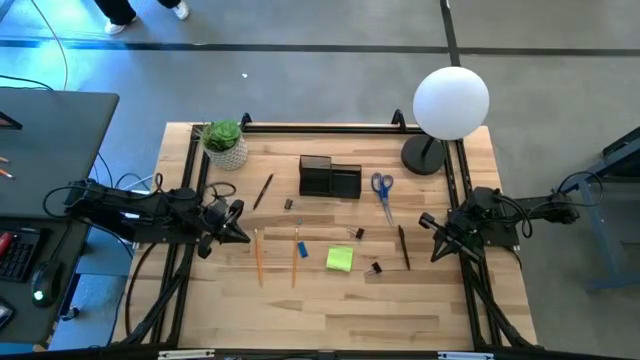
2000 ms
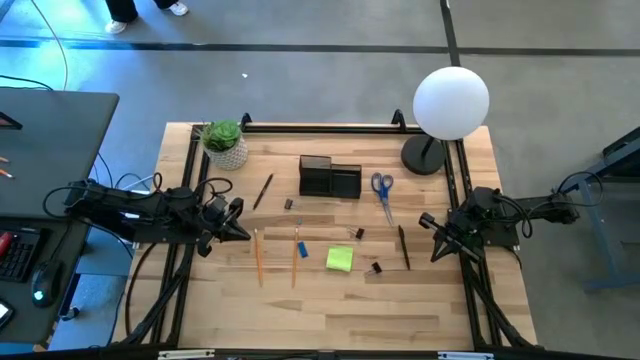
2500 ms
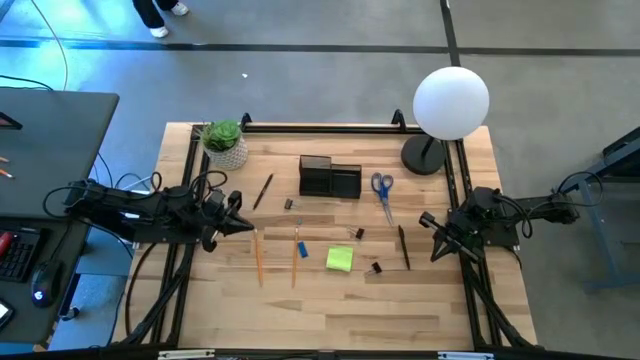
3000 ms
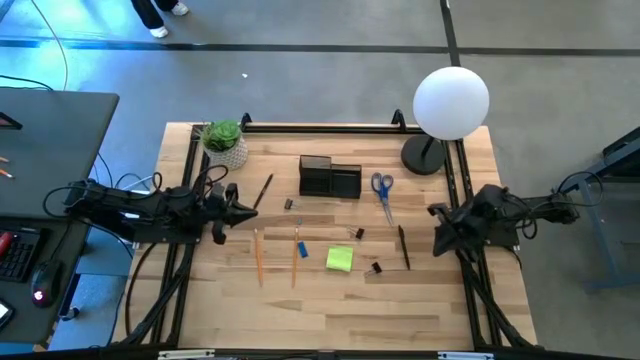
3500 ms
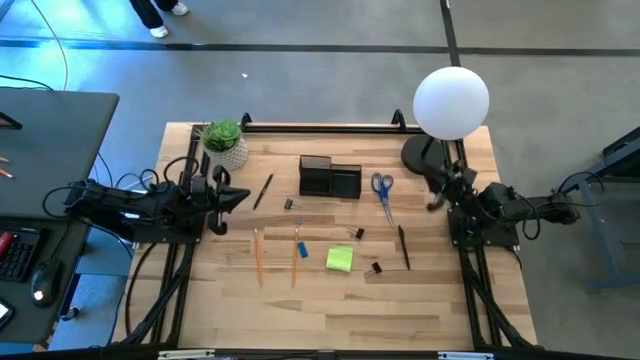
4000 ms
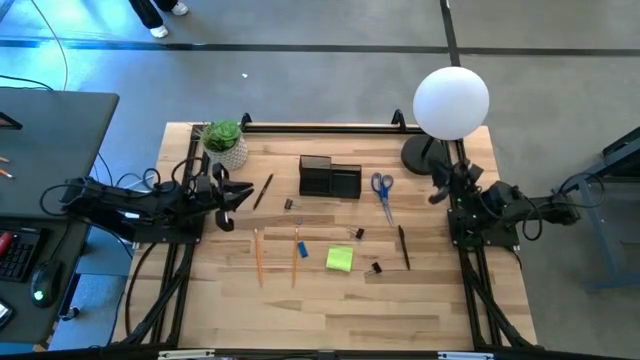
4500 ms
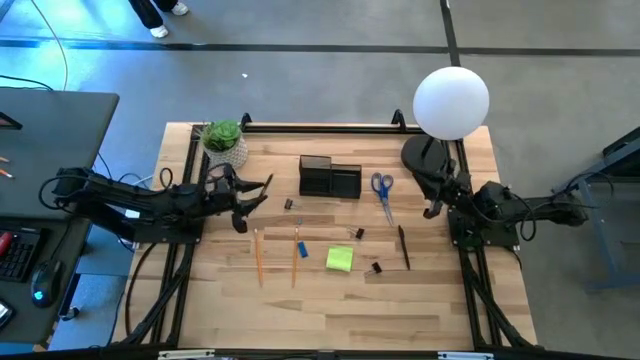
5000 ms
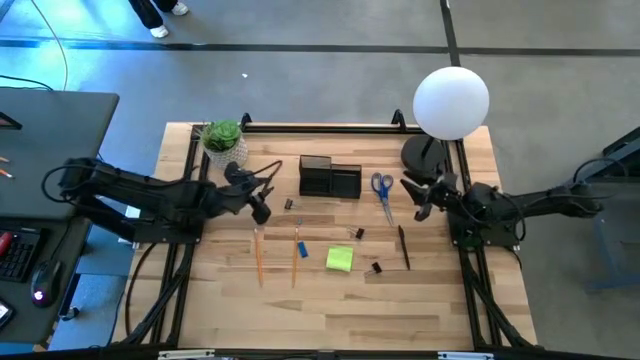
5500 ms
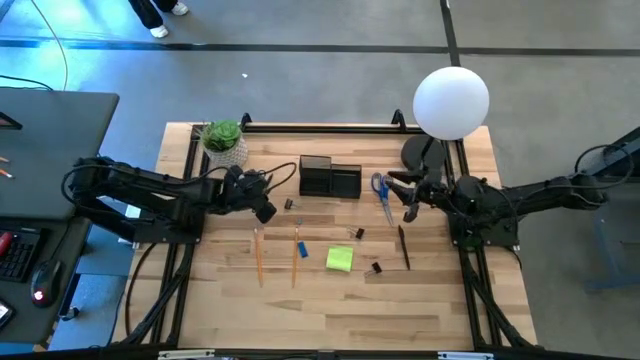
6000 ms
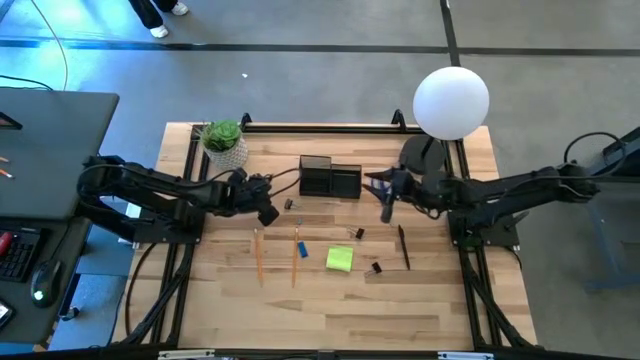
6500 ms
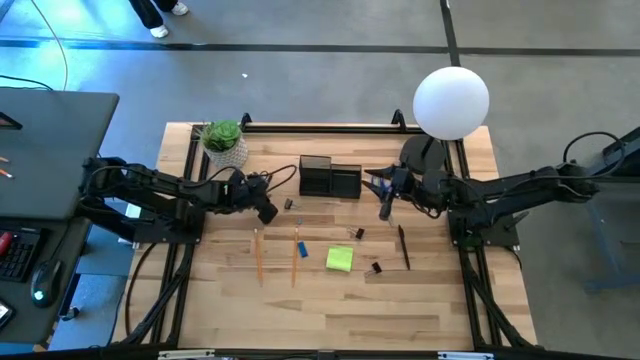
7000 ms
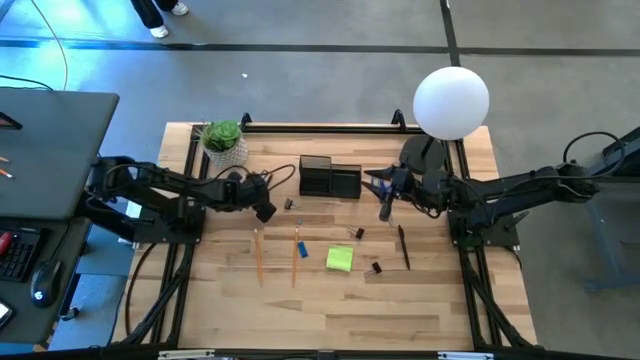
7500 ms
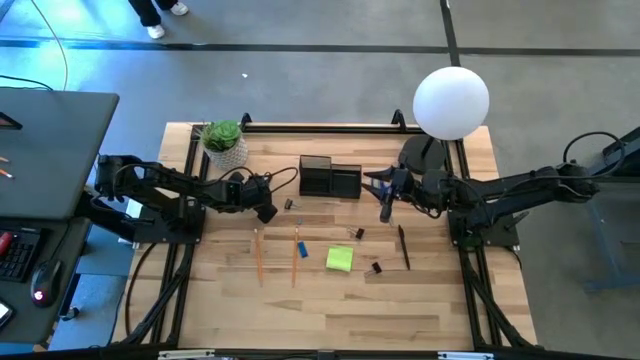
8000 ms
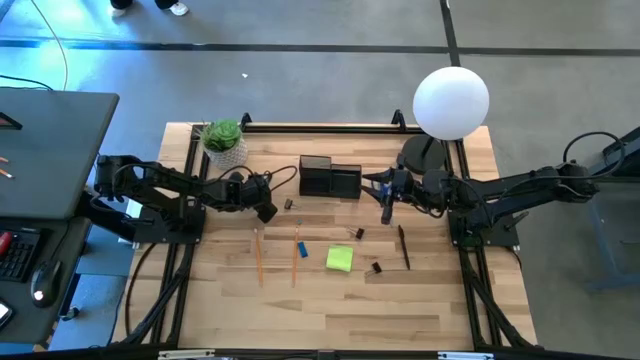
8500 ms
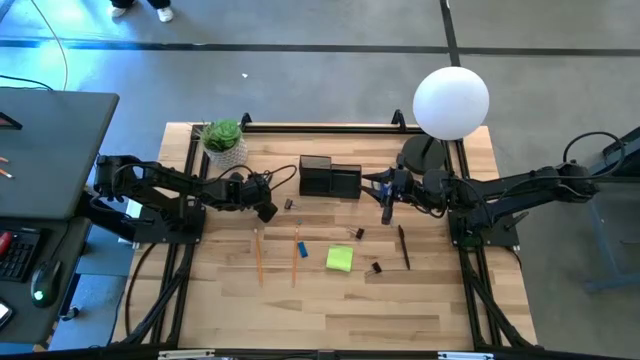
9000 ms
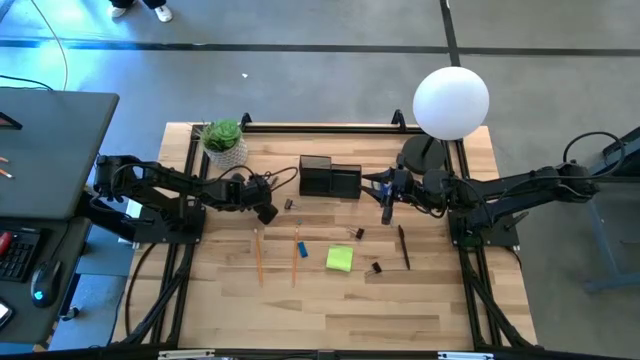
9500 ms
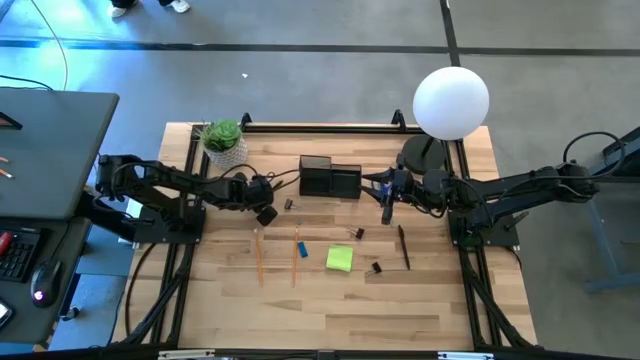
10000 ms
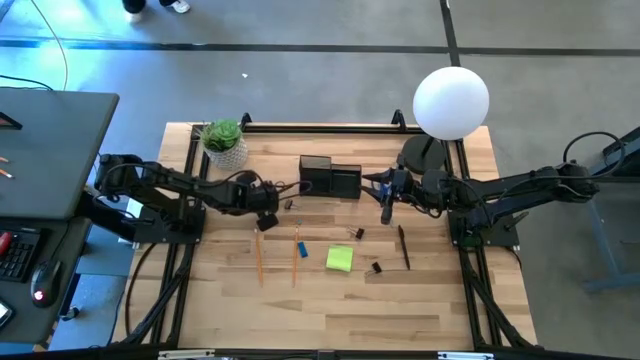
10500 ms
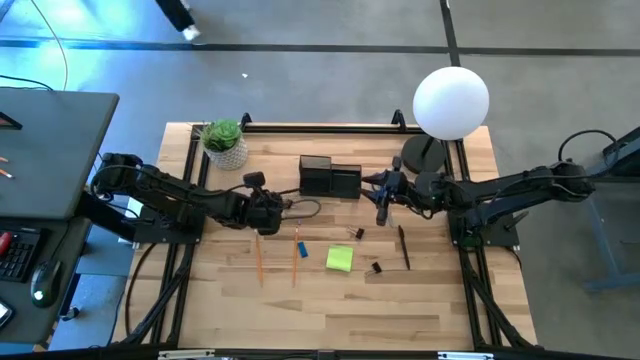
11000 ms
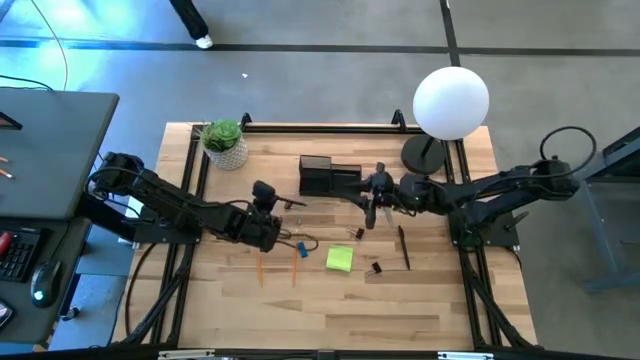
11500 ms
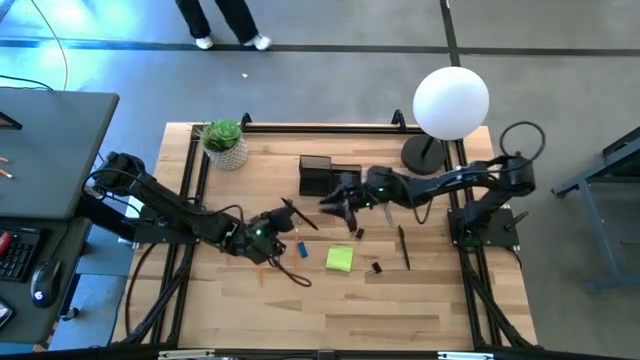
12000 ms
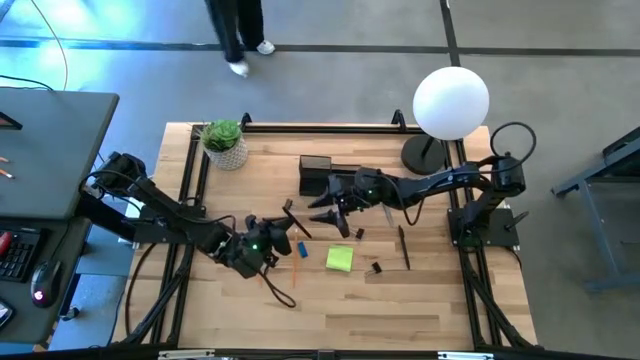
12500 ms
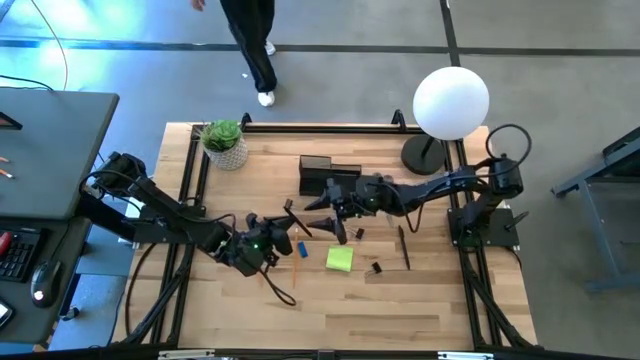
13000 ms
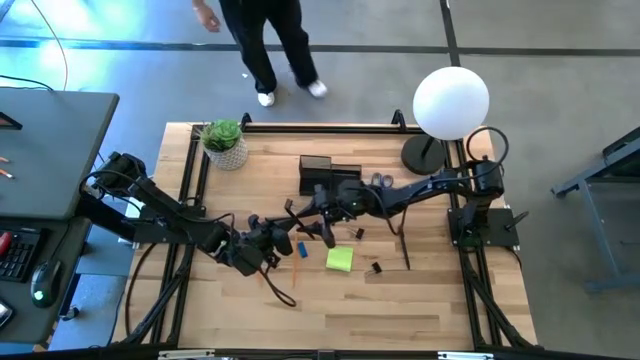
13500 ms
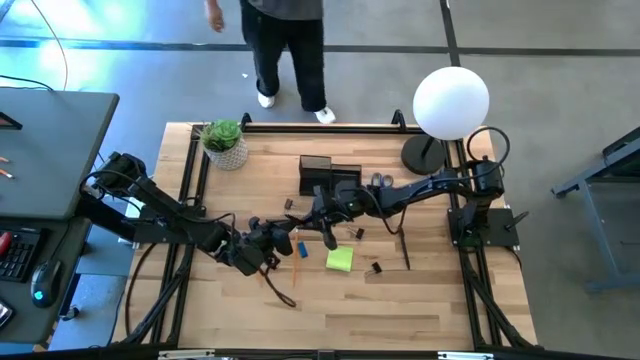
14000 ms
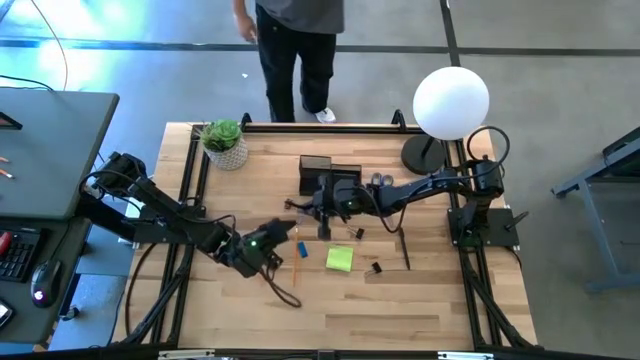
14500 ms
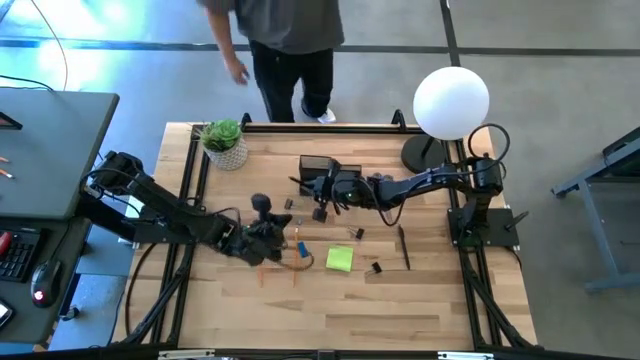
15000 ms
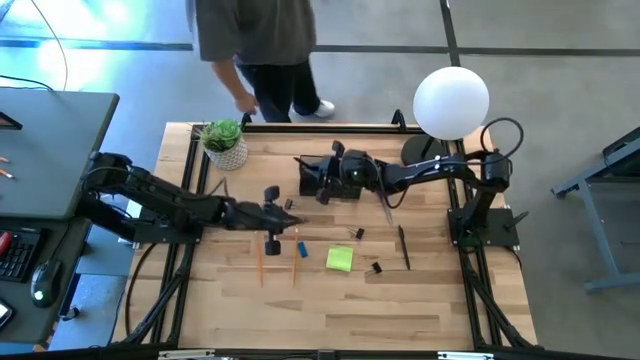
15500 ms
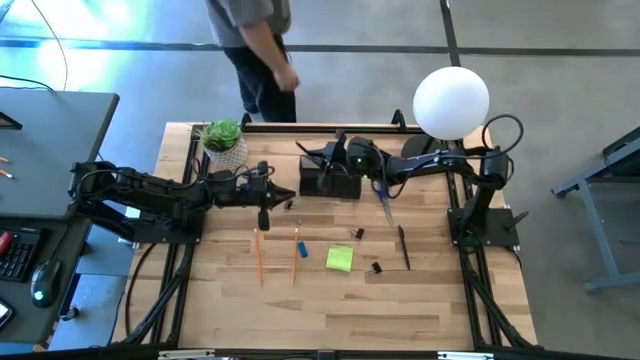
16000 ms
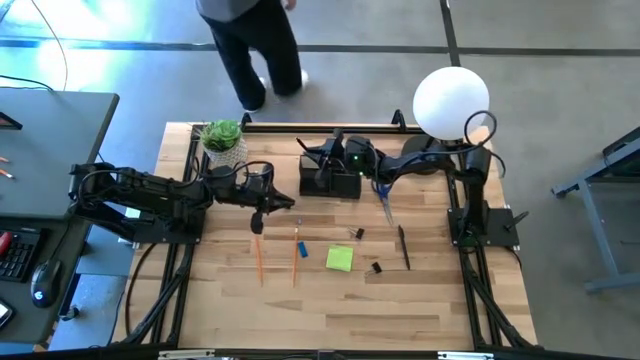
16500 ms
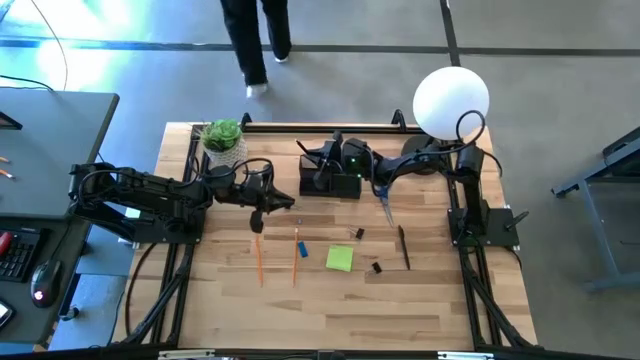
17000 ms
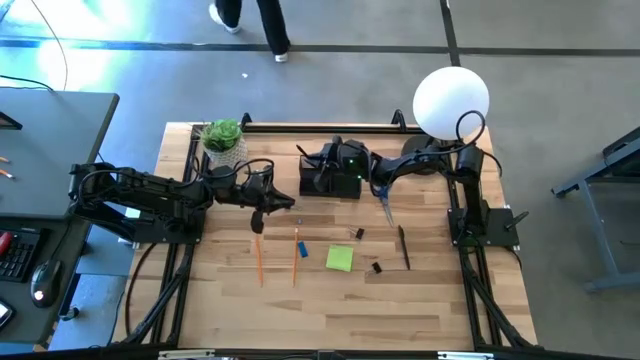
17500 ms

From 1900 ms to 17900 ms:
Task: Pick and place office supplies into organizer
Put the black pen into the black desk organizer

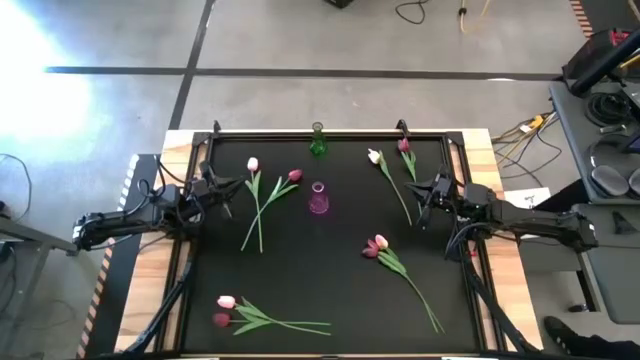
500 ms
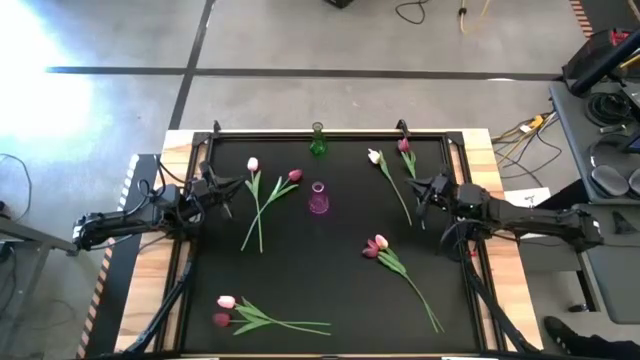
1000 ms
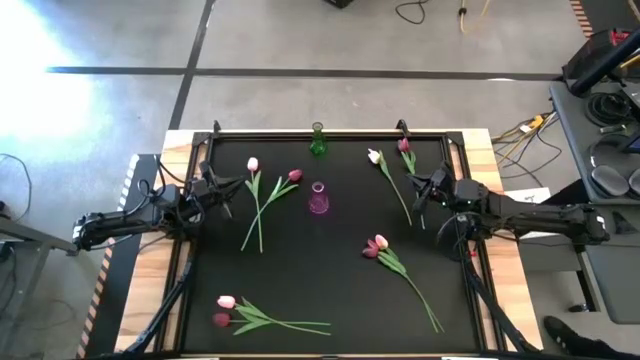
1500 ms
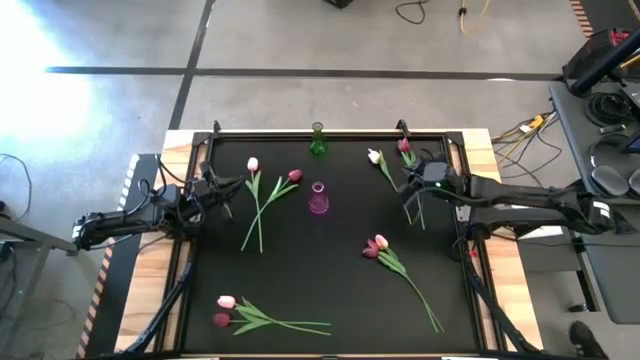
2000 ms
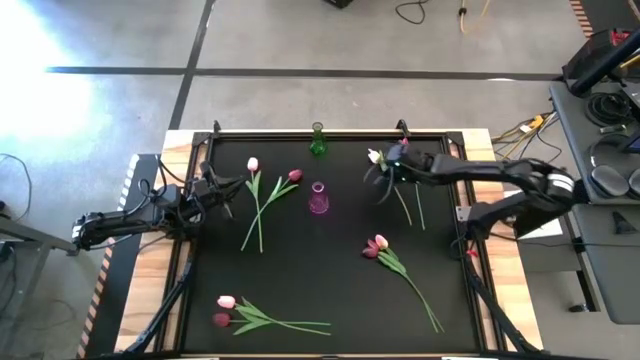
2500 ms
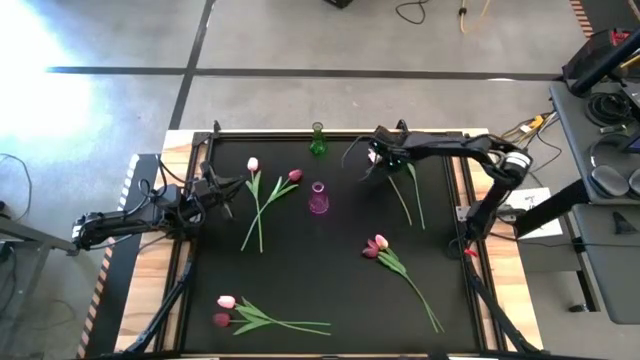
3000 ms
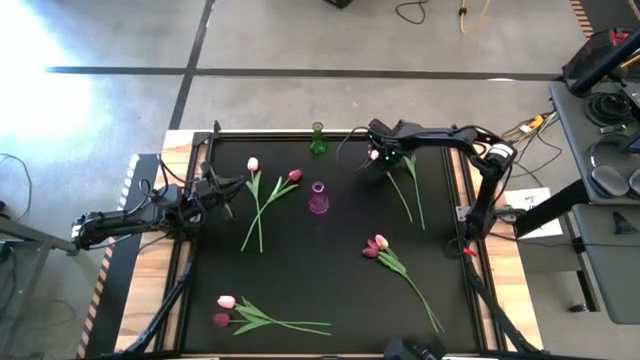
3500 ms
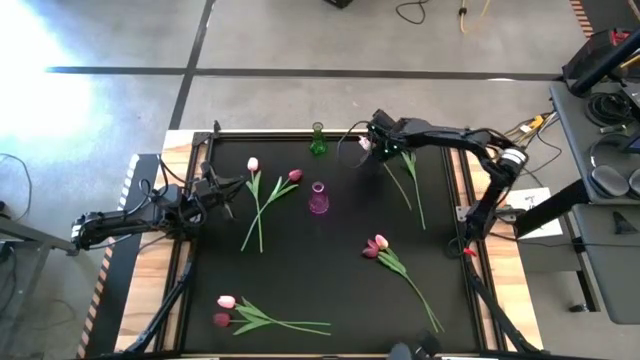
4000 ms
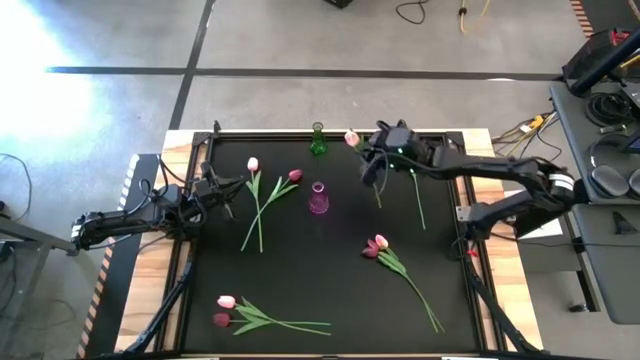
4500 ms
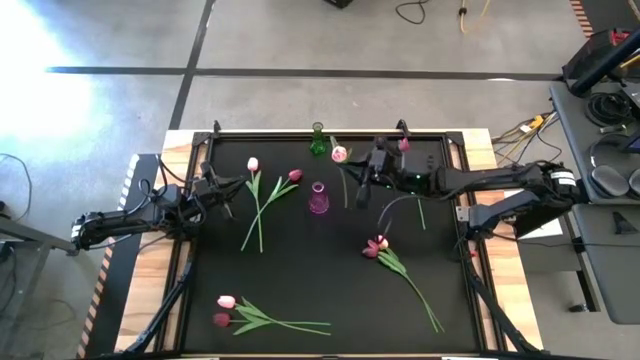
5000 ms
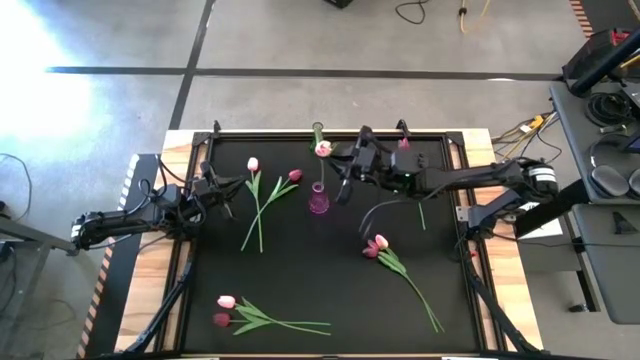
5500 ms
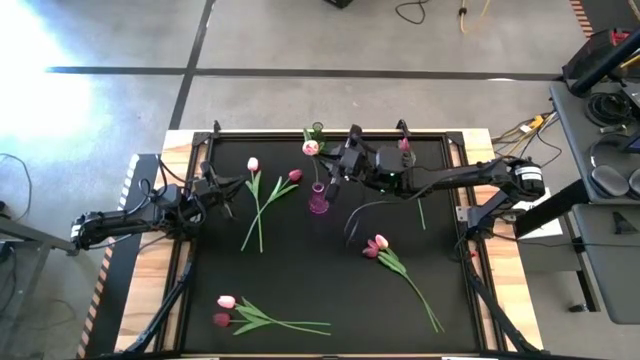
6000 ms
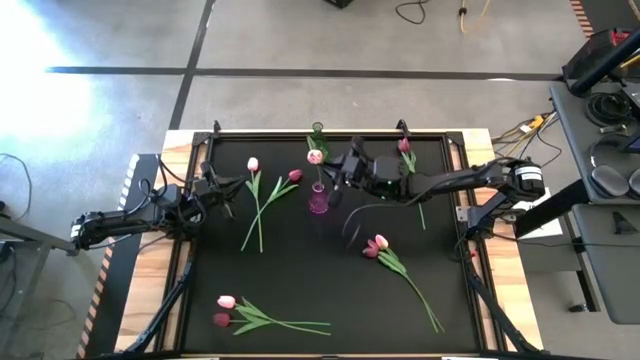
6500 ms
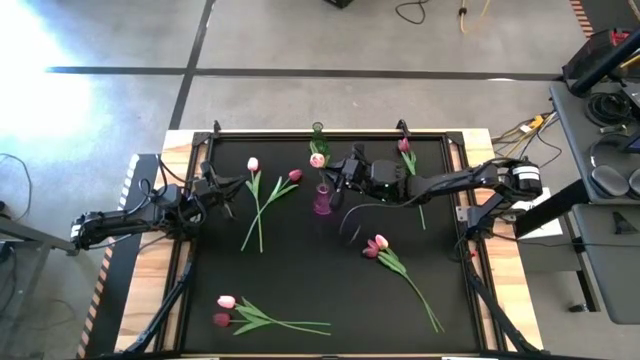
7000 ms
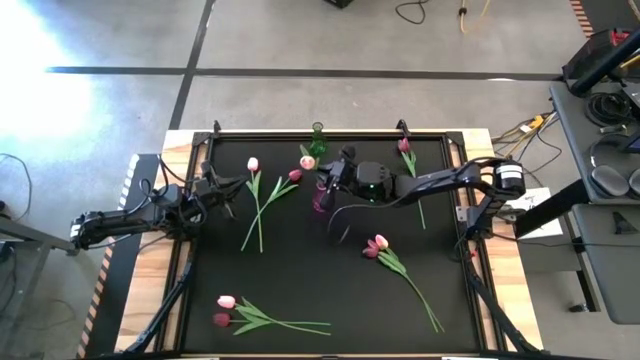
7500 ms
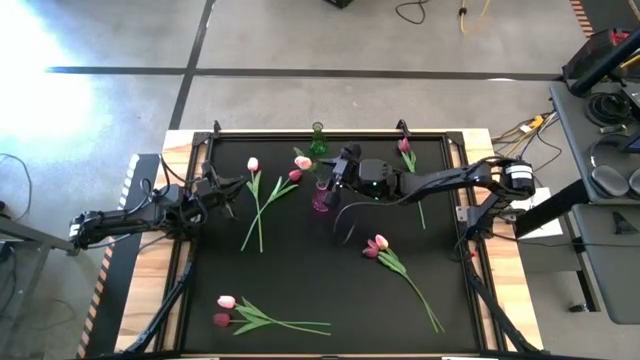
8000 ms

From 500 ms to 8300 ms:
Task: Sort flowers into vase by color
Put the purple flower into the purple vase
